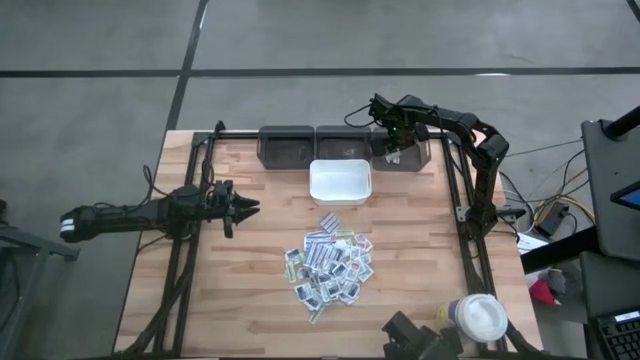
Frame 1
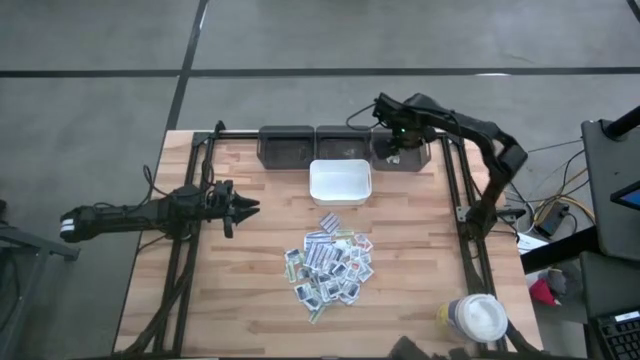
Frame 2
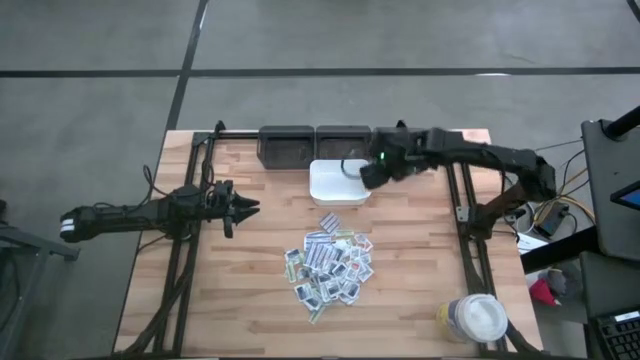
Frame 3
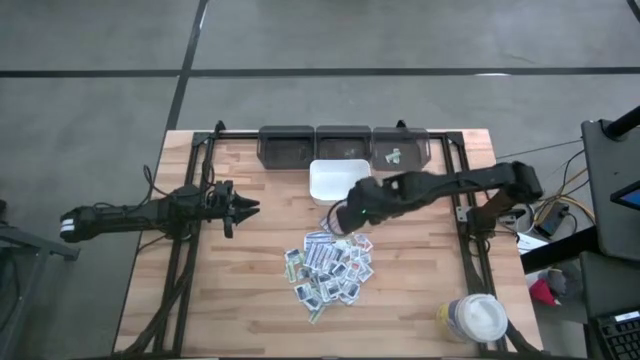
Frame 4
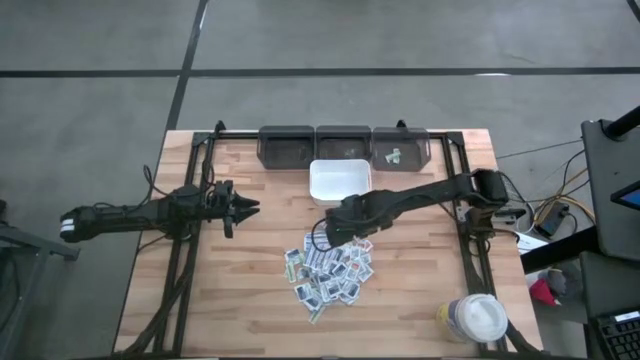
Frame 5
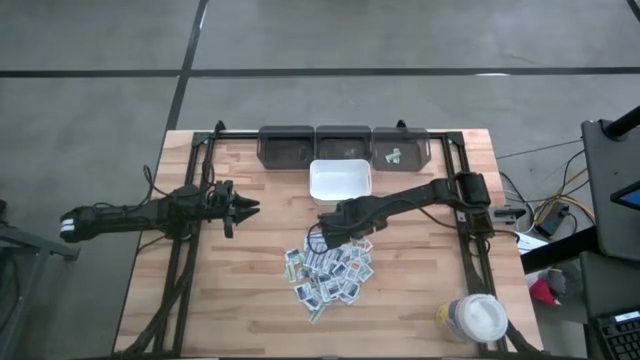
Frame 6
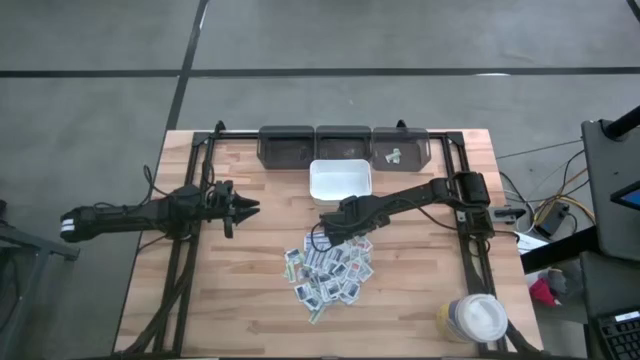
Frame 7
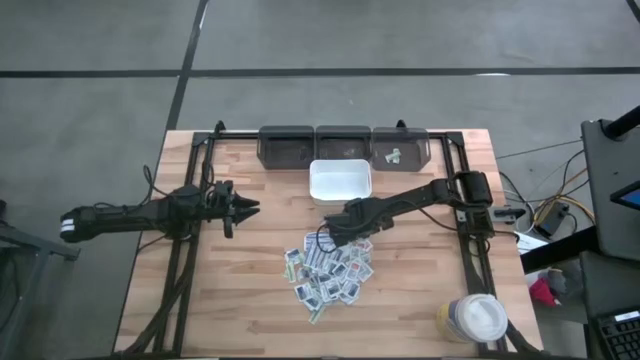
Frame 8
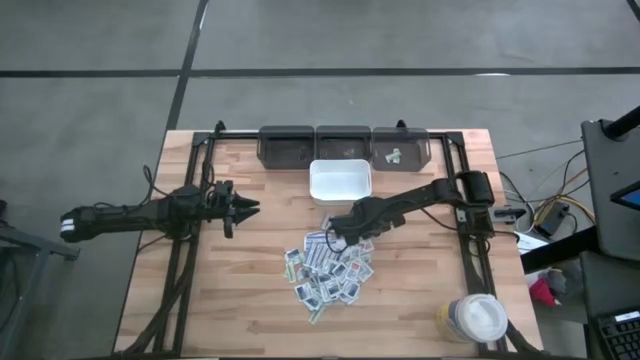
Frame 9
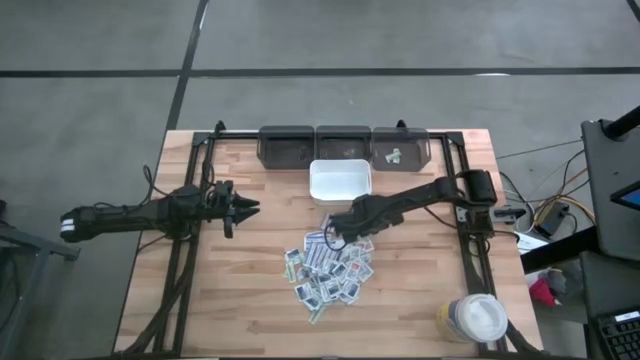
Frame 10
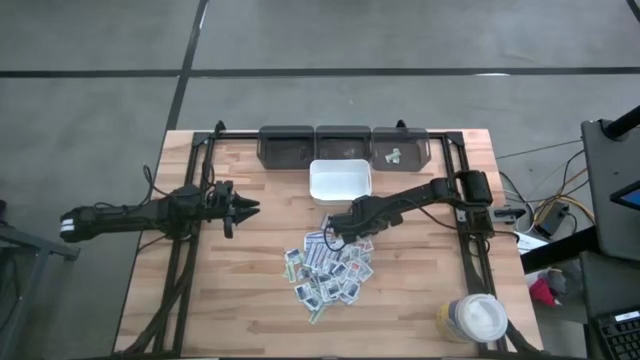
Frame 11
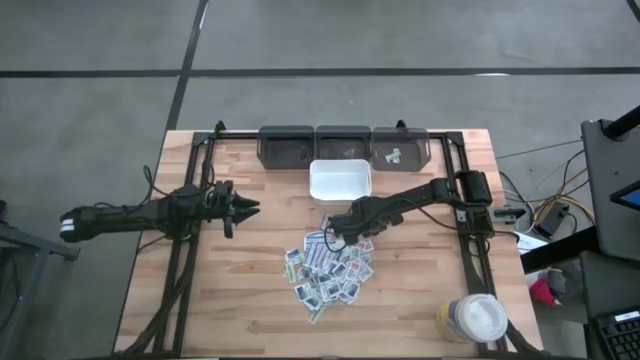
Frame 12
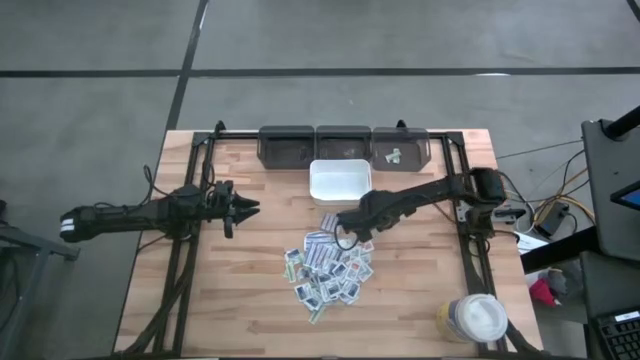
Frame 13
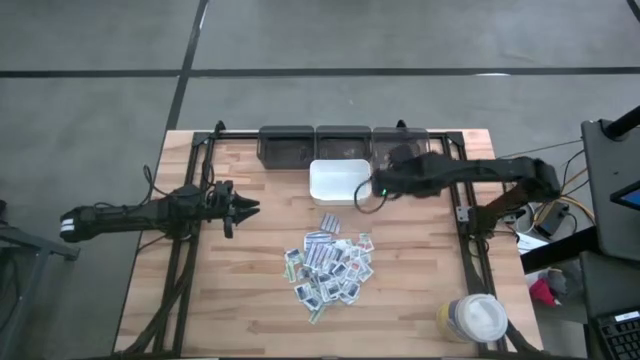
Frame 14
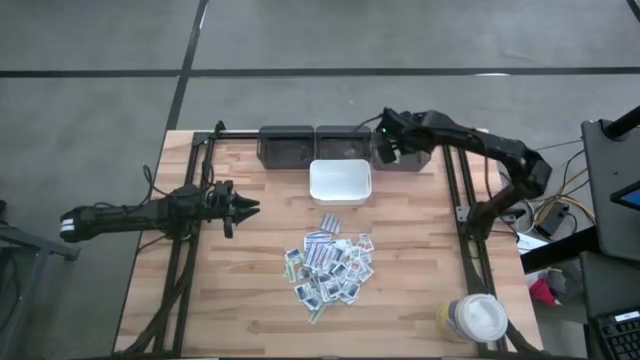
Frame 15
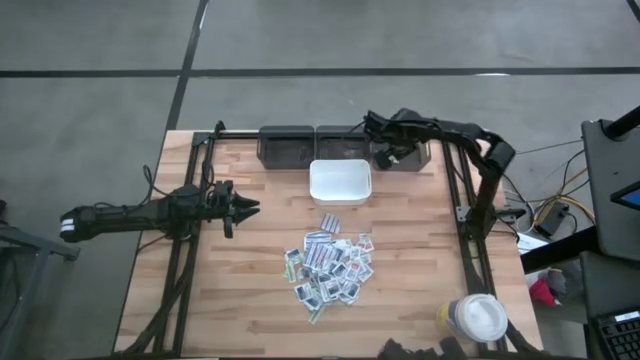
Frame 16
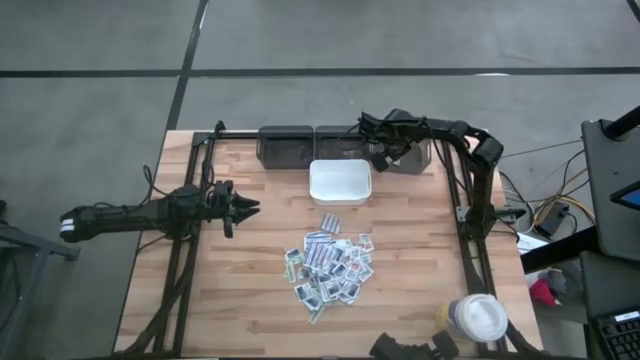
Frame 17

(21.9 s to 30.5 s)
Task: Pick & Place First Aid Supplies
Put the green bandage pack into the right gray bin

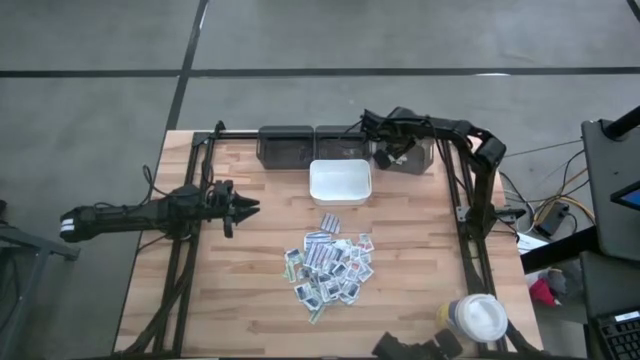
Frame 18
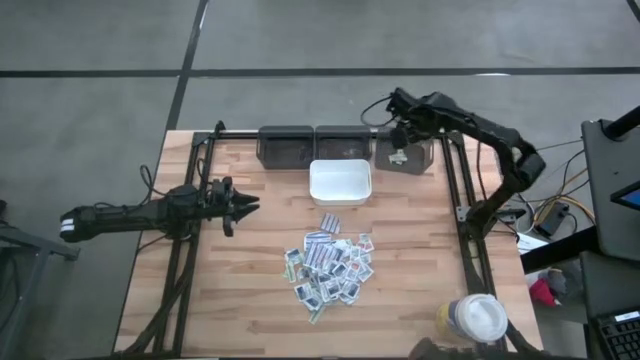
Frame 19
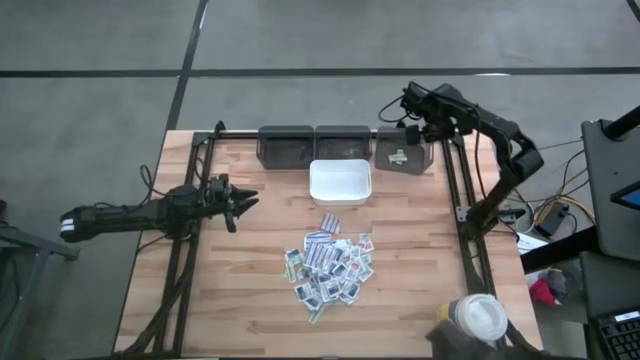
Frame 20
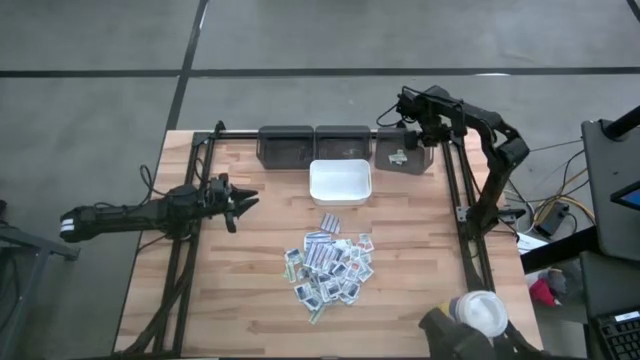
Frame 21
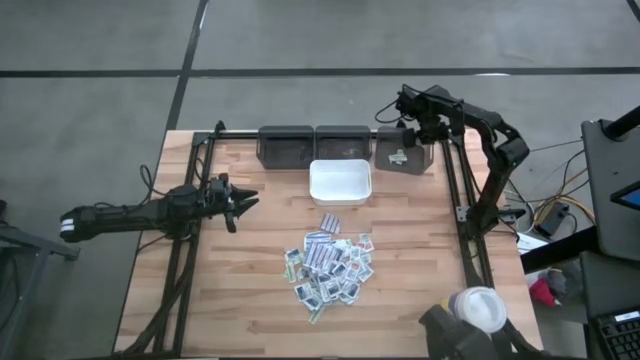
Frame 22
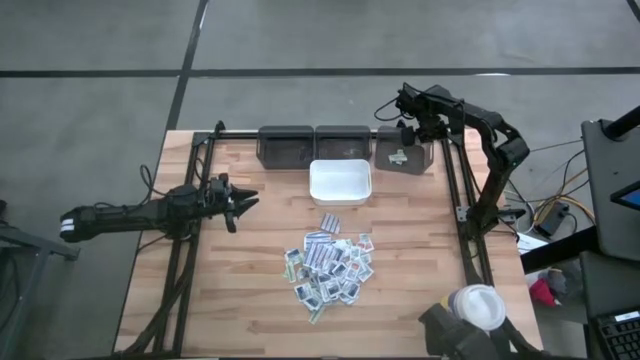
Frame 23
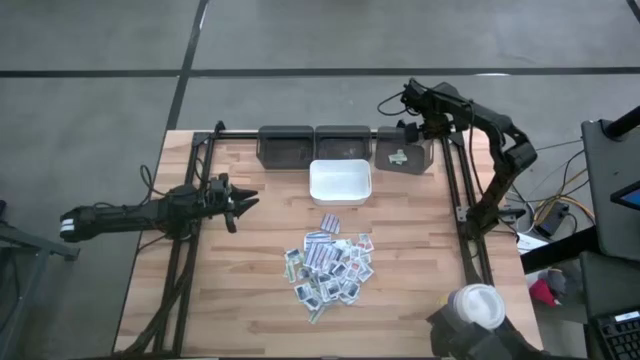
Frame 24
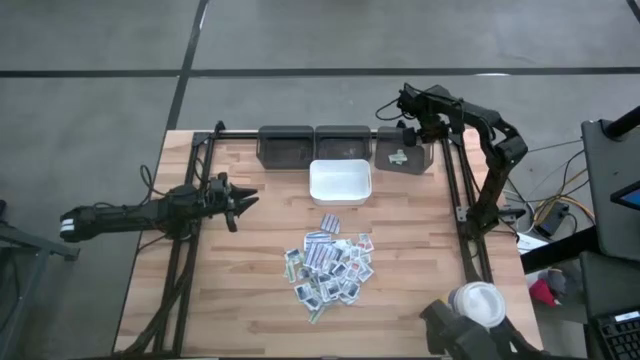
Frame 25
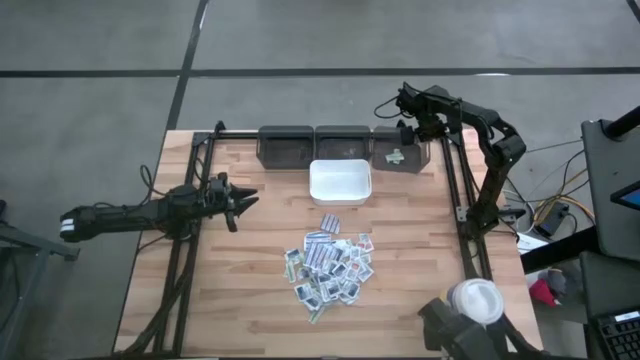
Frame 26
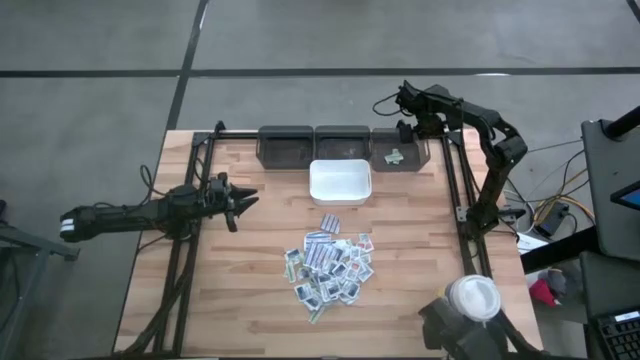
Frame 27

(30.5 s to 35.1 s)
Adjust the right gray bin on the table

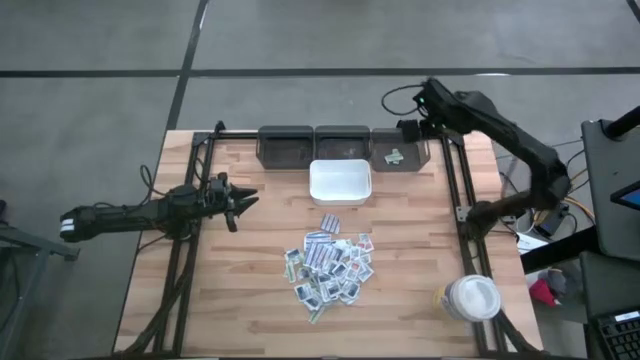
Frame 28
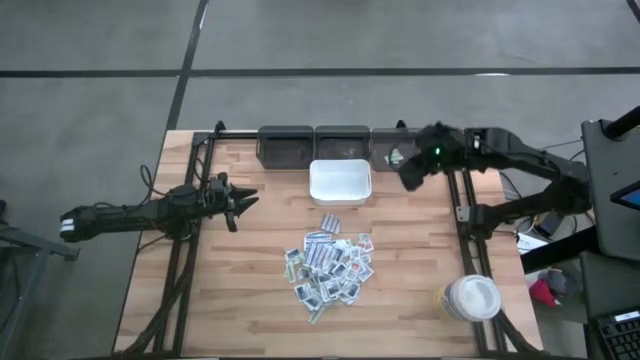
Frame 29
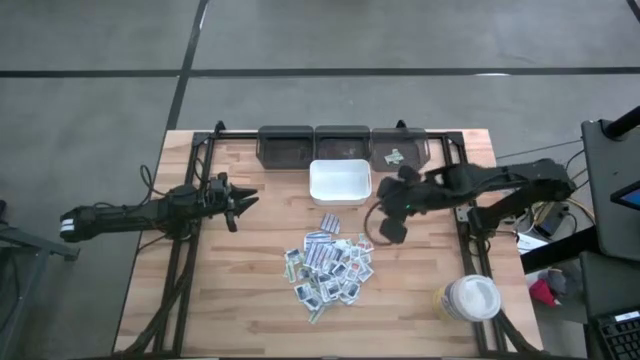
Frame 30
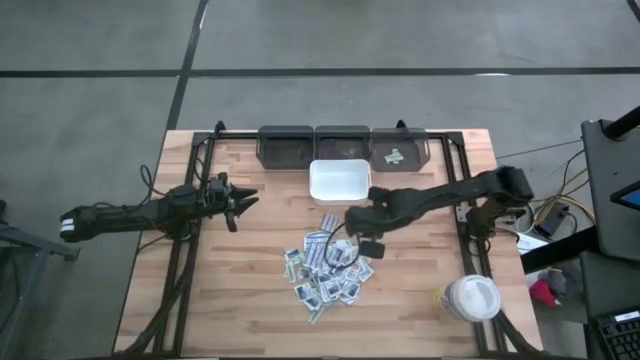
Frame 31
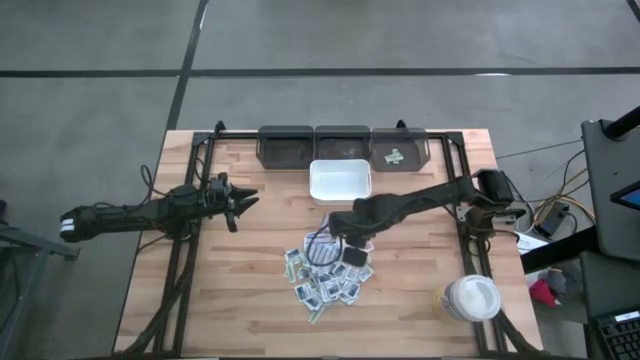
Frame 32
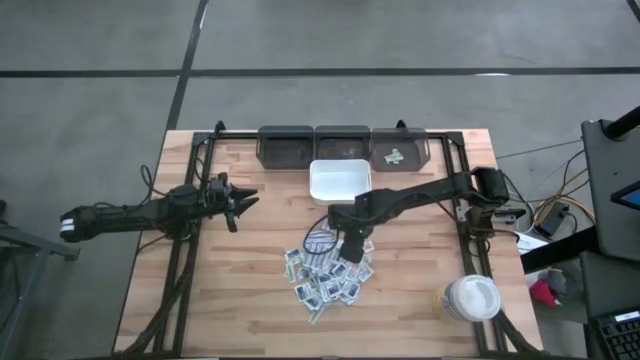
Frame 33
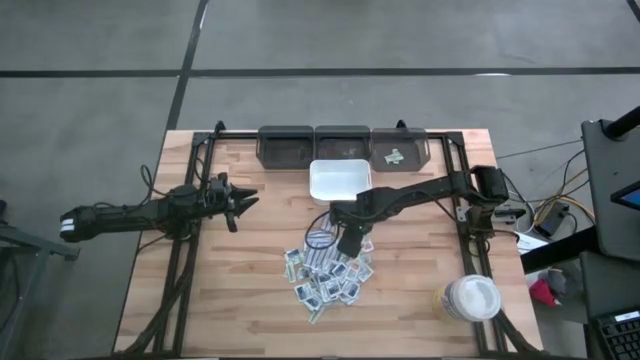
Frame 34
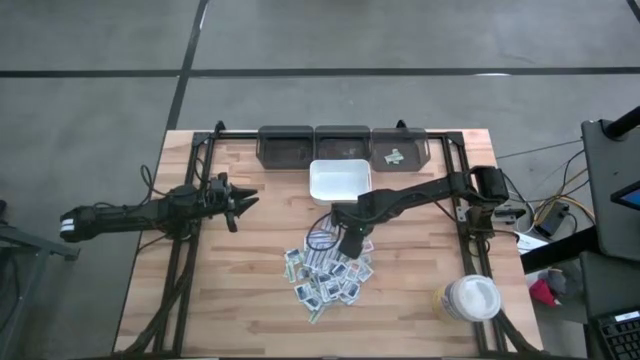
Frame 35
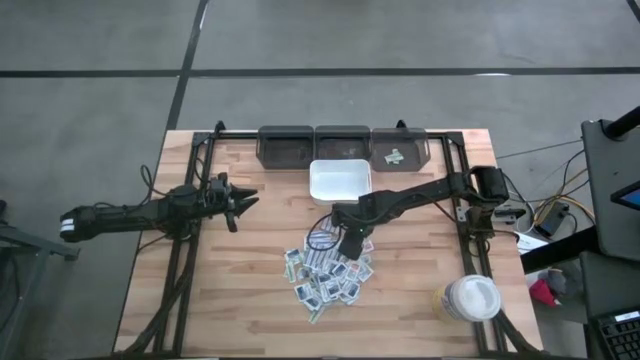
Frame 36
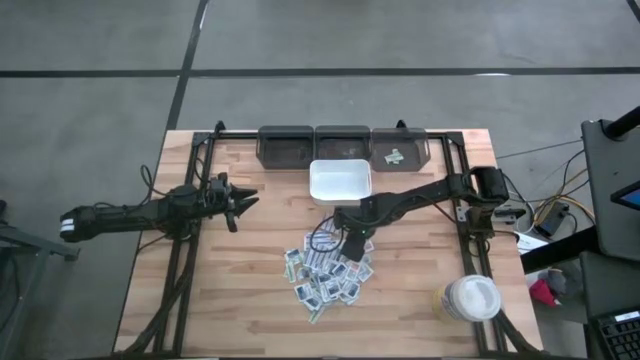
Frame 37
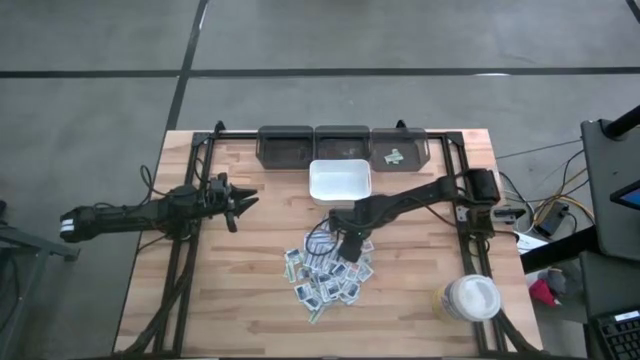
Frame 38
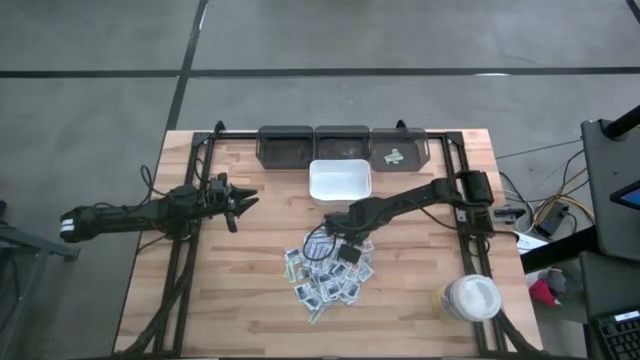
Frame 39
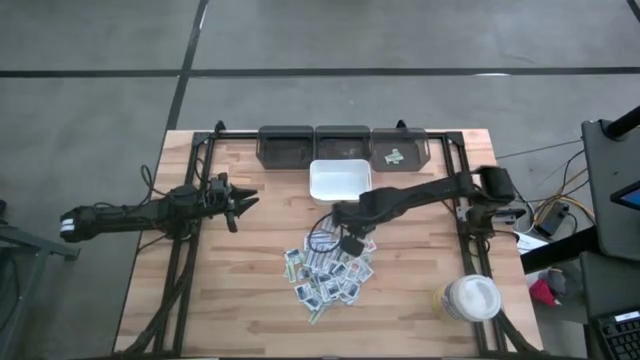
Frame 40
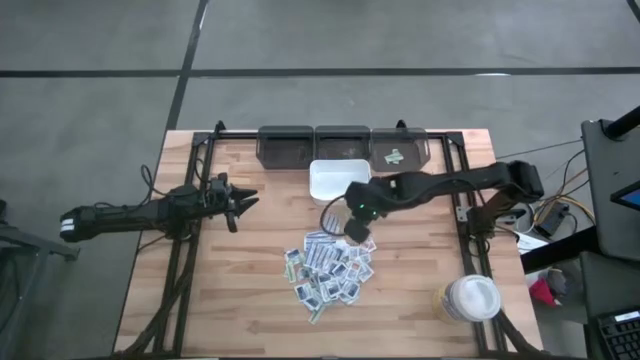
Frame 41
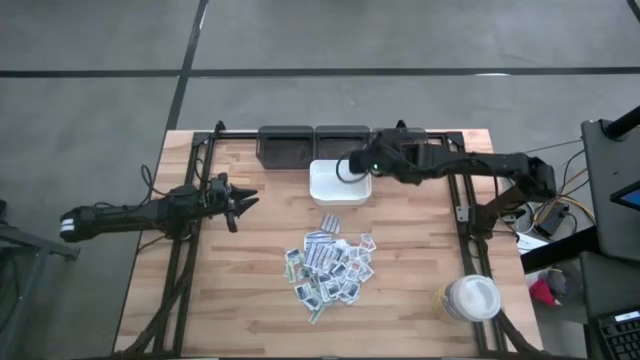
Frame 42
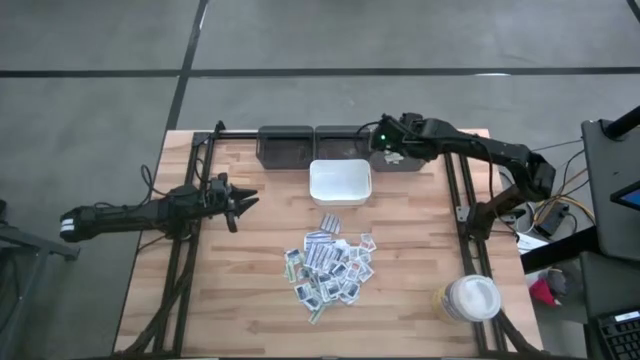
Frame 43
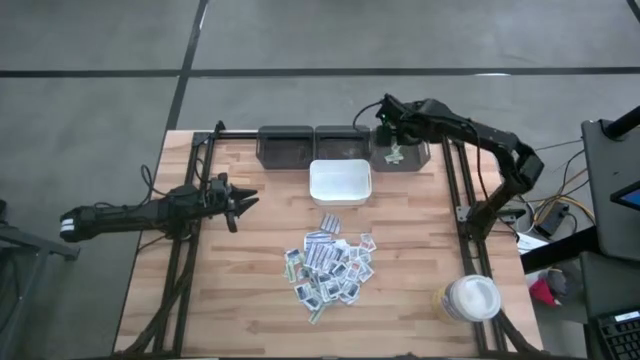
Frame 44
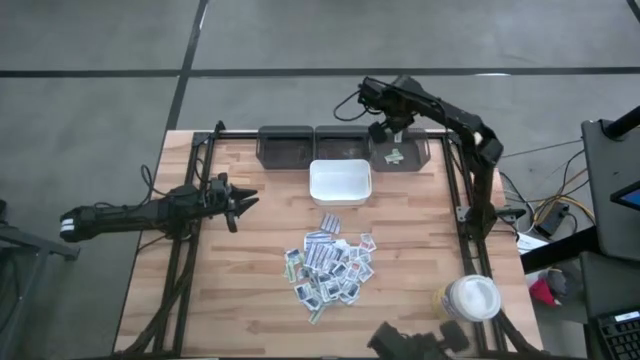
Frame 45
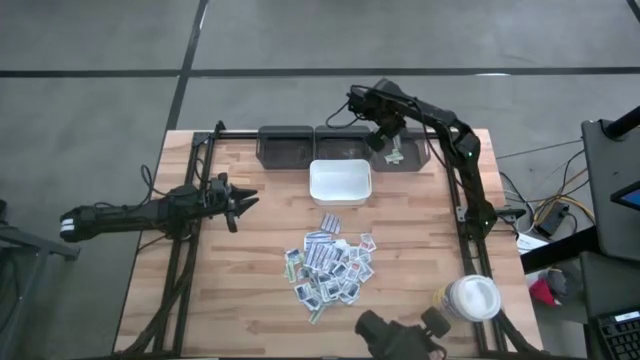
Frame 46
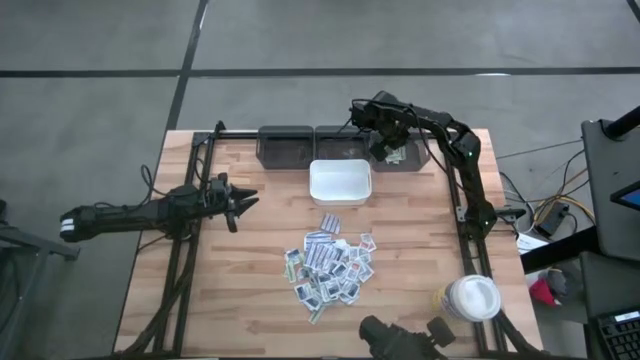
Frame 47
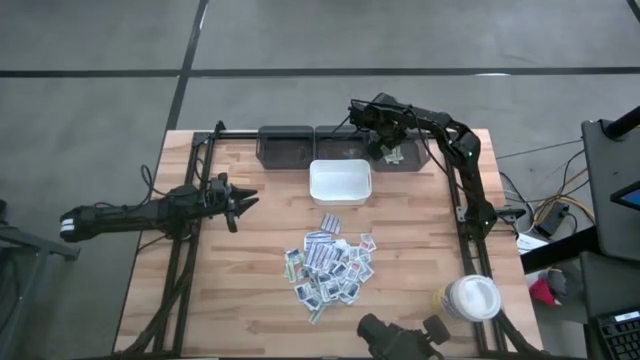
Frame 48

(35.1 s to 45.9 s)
Put the green bandage pack into the right gray bin
